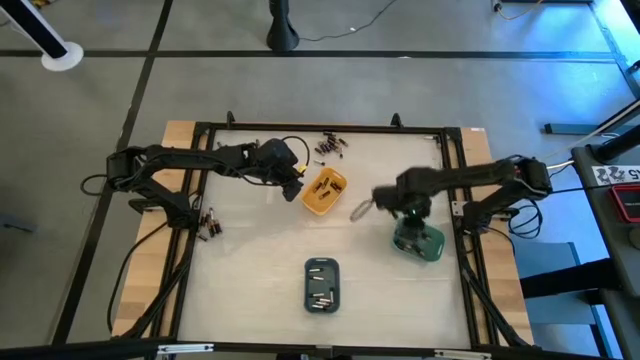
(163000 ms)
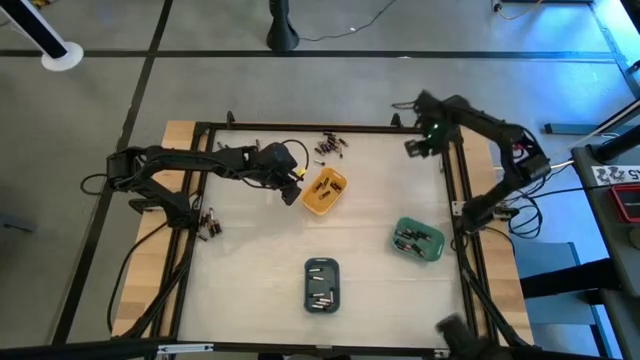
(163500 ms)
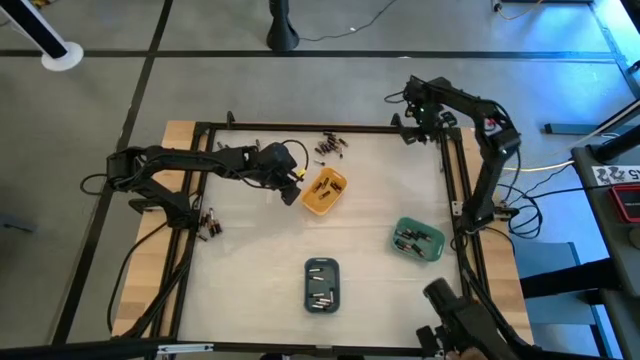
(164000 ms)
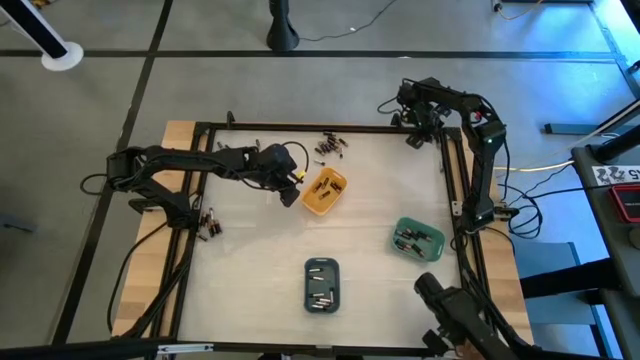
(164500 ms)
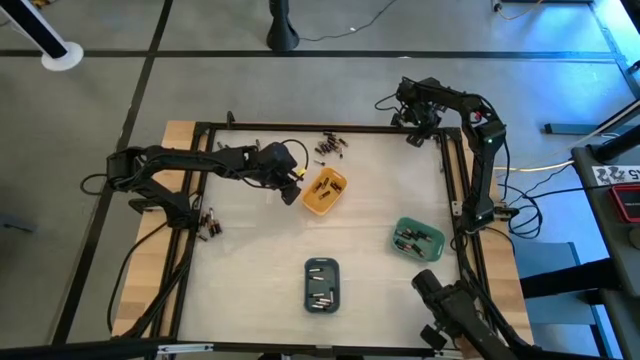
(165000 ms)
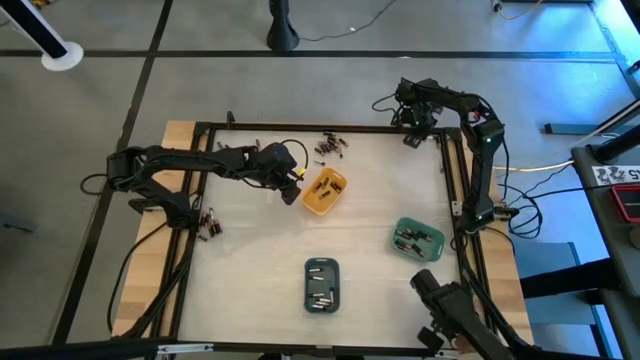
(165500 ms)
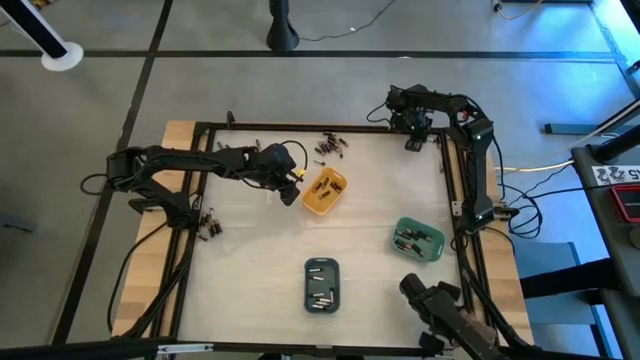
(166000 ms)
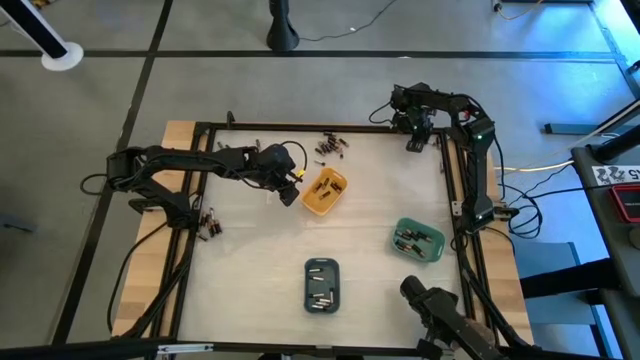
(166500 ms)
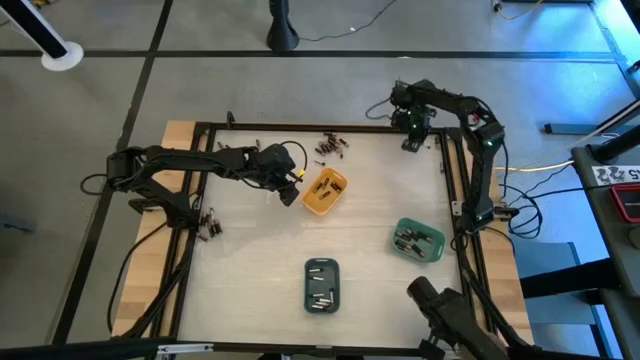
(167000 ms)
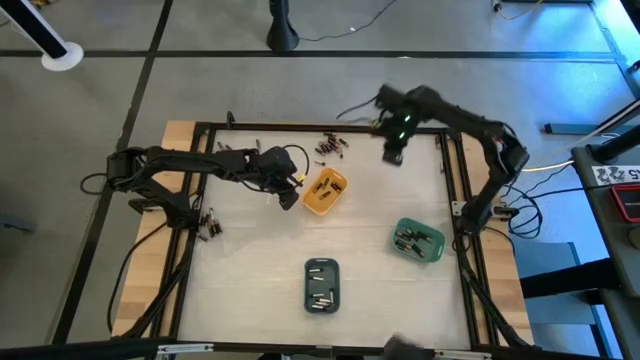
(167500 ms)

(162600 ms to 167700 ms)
Task: Sort batteries
Put the silver battery into the blue bin

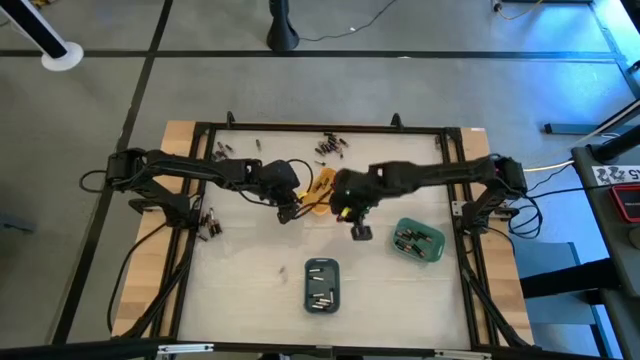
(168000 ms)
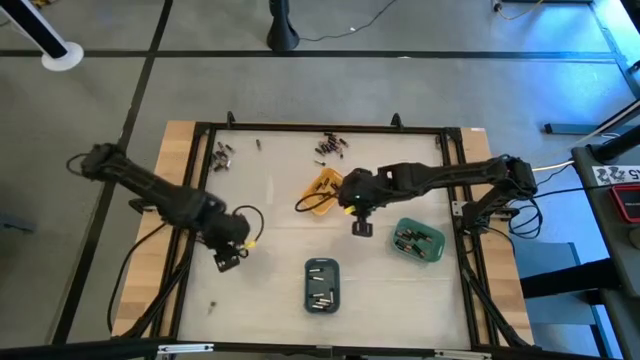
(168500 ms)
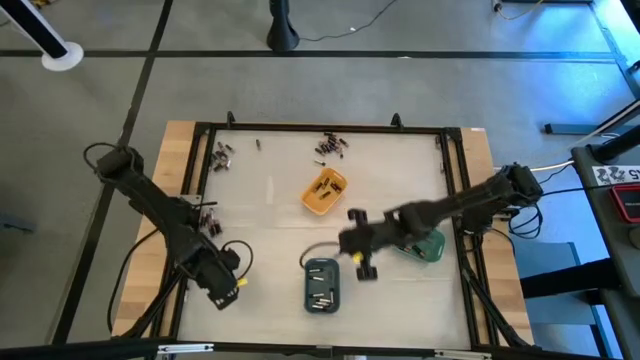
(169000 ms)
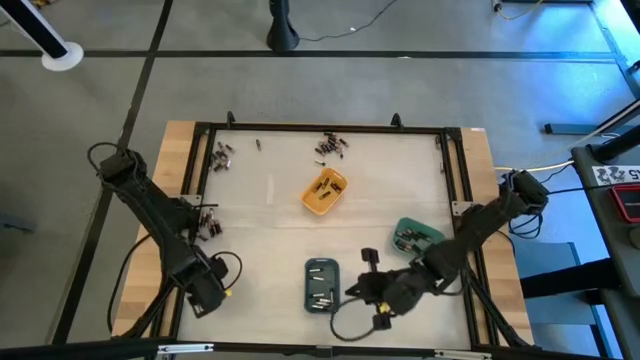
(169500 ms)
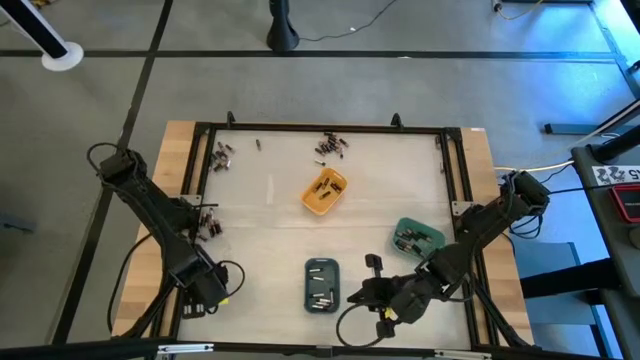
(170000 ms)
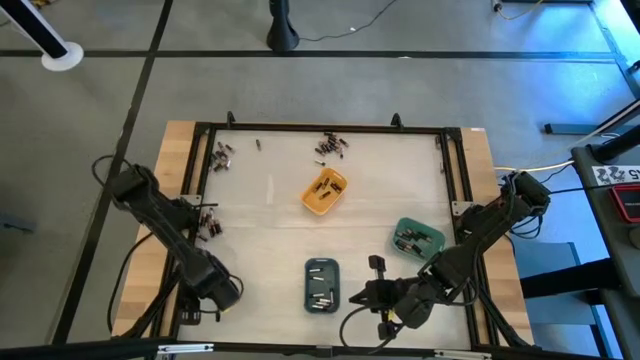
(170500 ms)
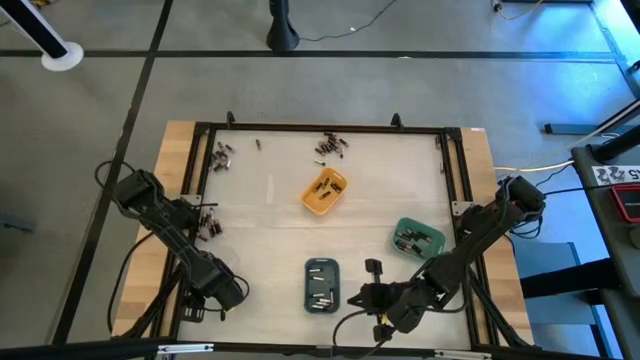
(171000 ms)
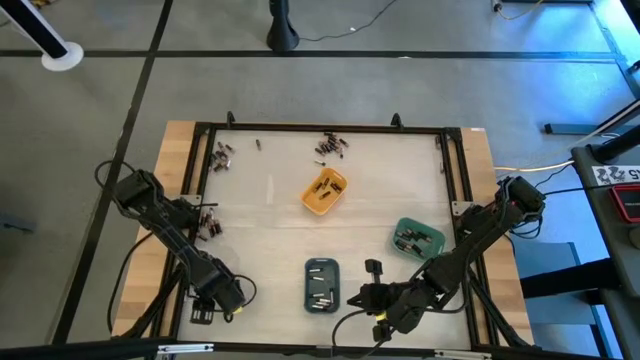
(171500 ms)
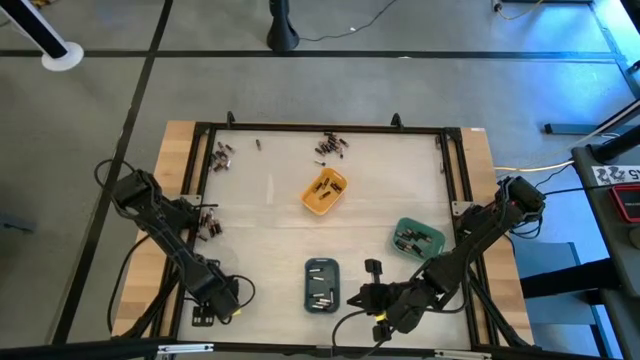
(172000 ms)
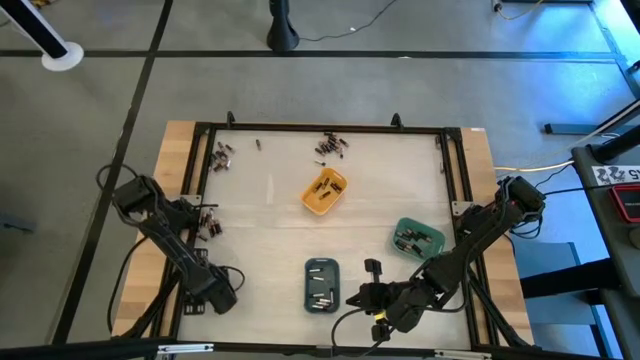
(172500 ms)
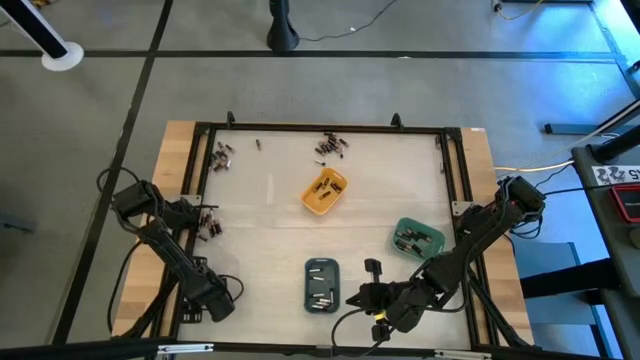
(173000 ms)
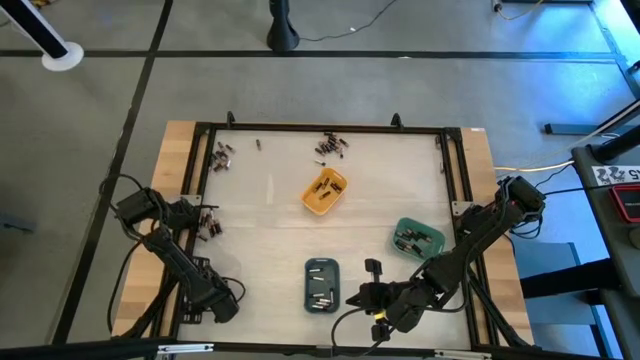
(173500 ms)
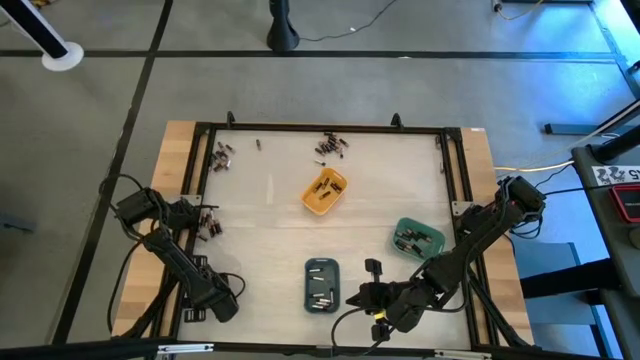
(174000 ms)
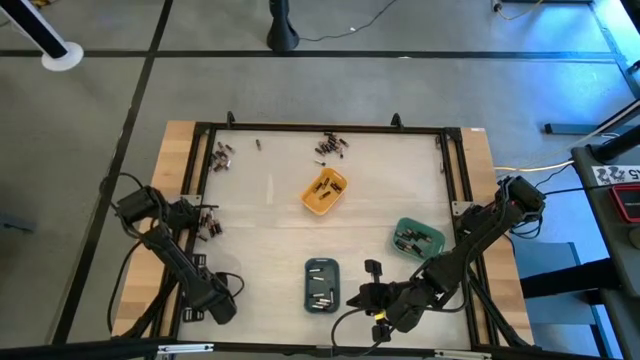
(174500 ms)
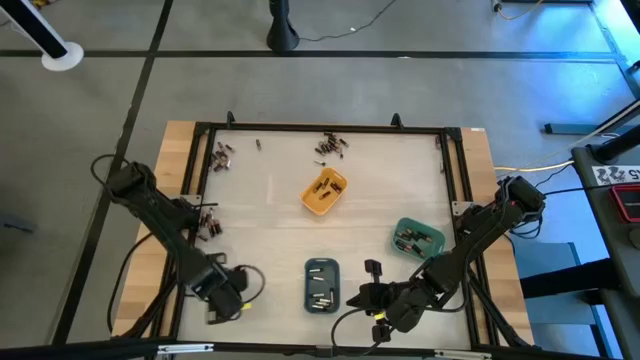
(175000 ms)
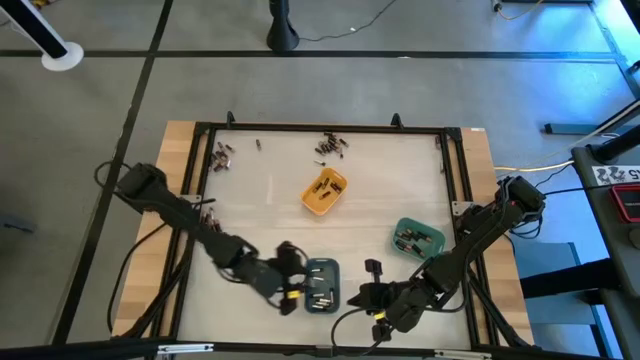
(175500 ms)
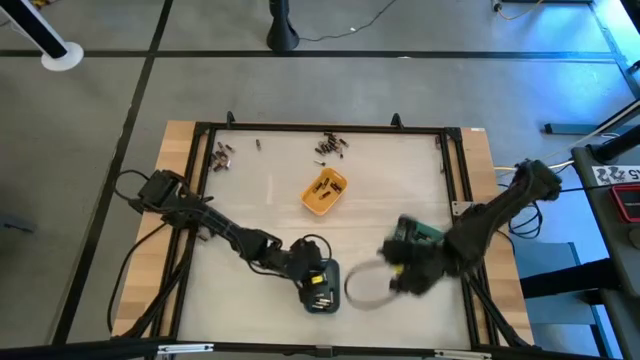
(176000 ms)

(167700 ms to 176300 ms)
Put the silver battery into the blue bin

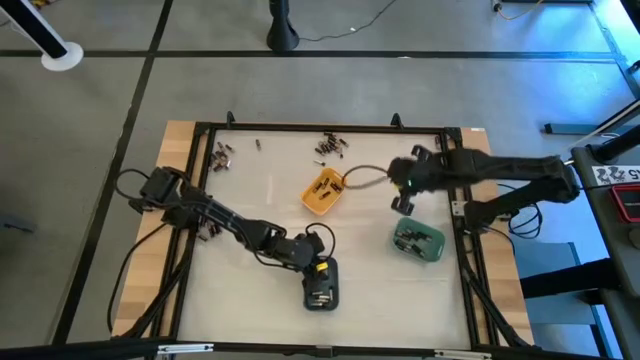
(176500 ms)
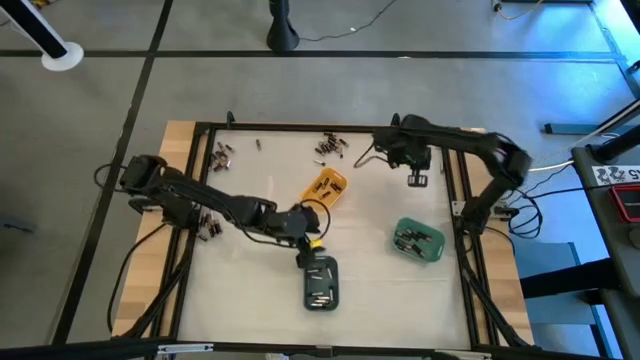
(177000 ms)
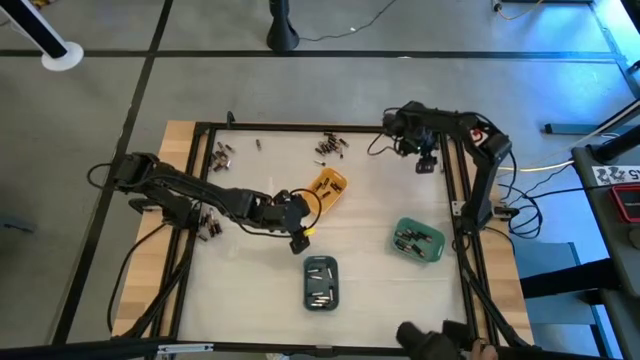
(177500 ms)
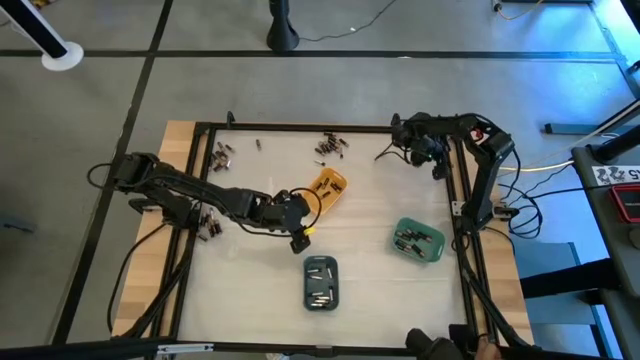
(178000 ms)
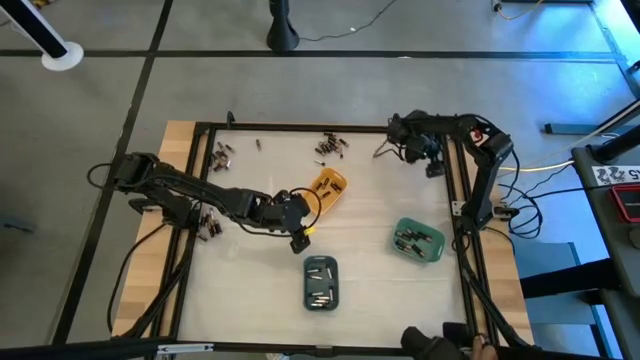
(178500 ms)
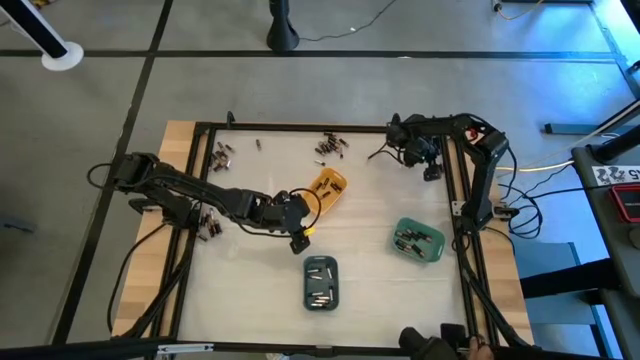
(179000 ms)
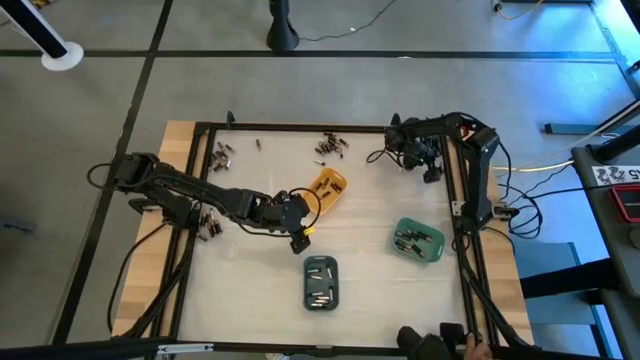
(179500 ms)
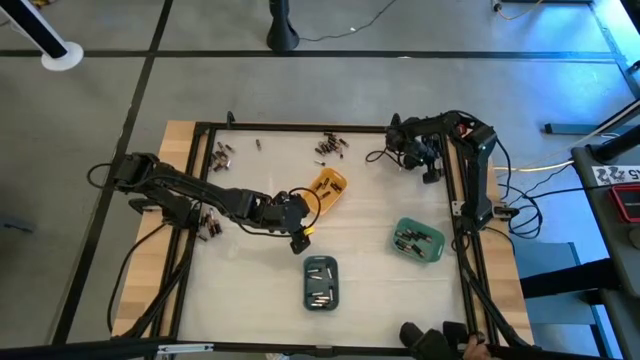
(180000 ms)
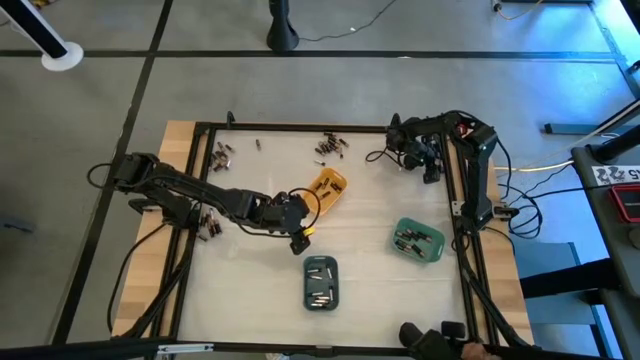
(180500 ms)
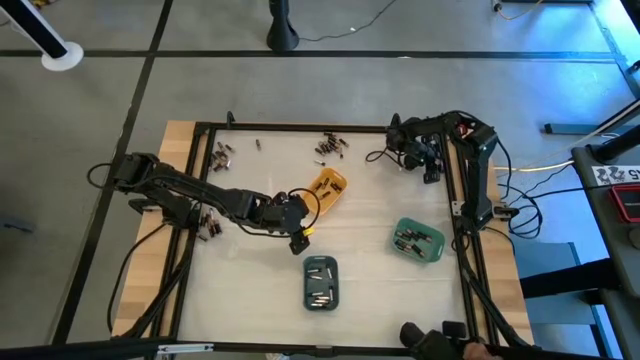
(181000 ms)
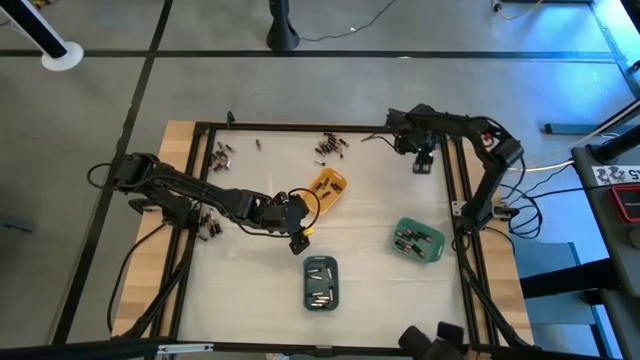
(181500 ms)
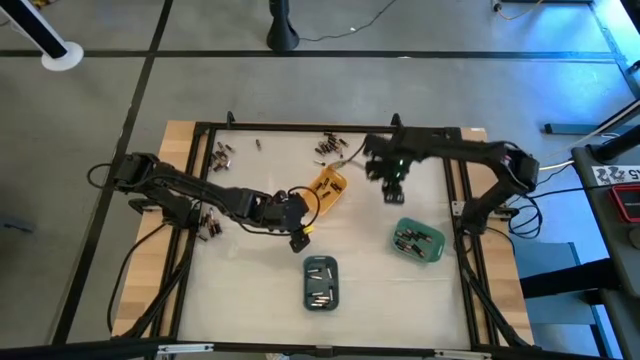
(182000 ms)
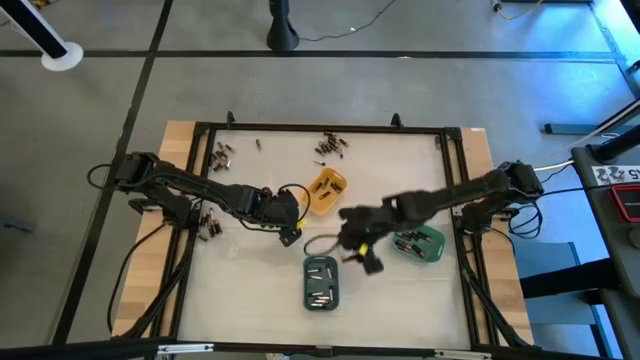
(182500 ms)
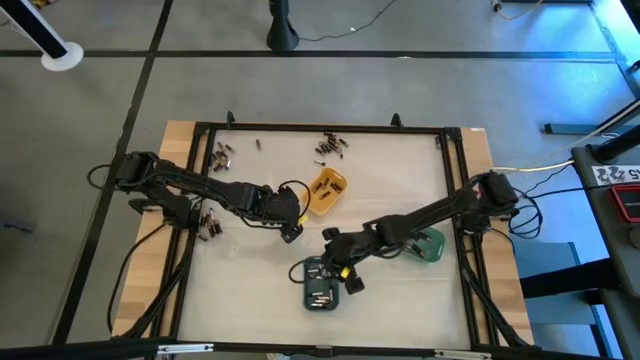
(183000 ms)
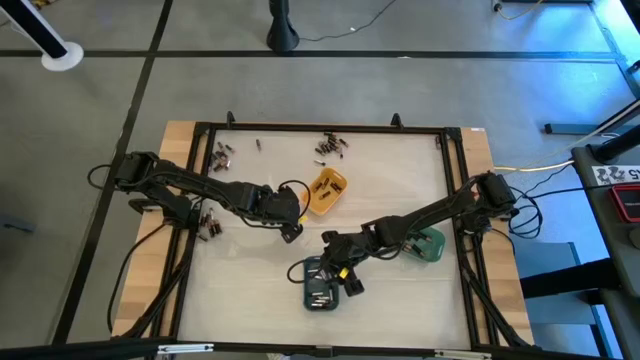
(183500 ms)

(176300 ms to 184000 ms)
Put the silver battery into the blue bin

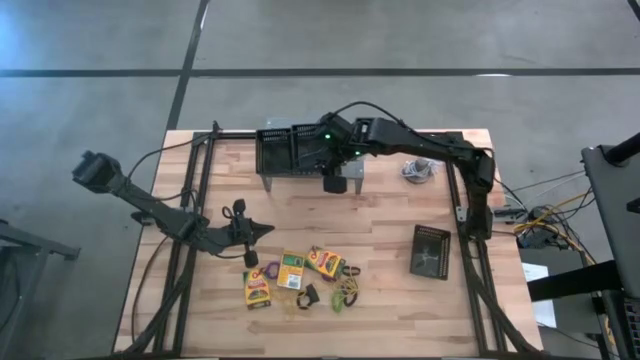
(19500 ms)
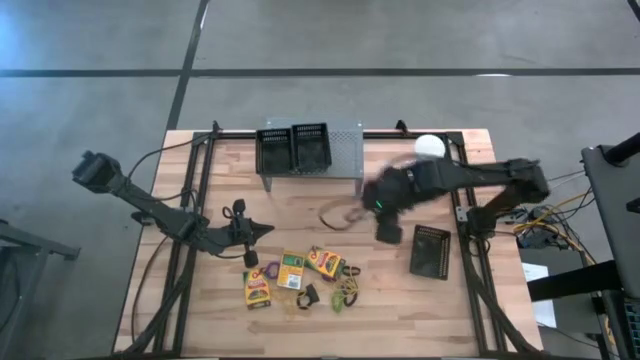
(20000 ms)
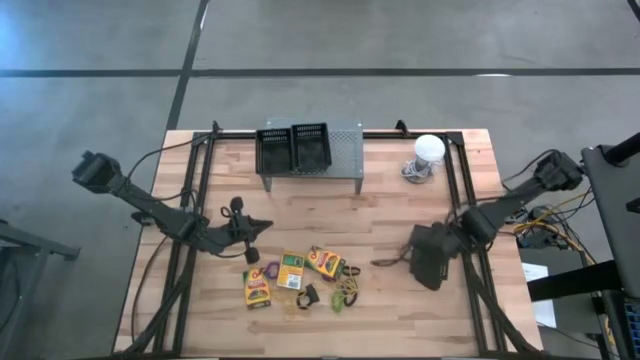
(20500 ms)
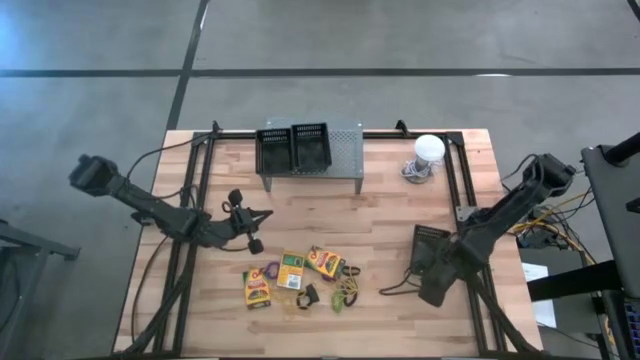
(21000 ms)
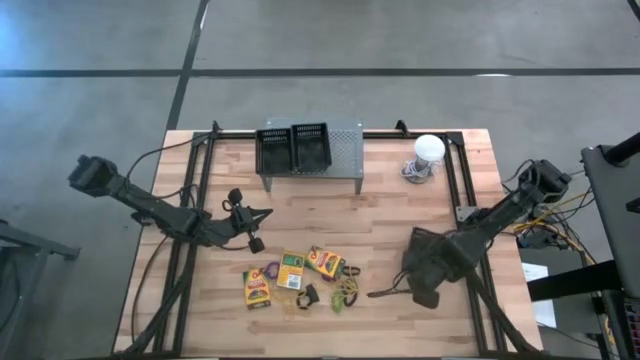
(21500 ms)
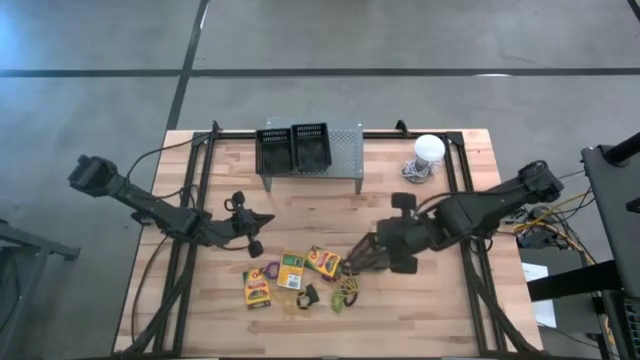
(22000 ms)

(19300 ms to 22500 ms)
Task: Pick & Place Office Desk Supplies
Put the black basket
